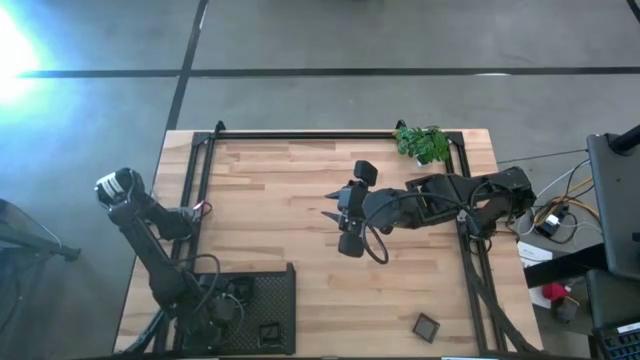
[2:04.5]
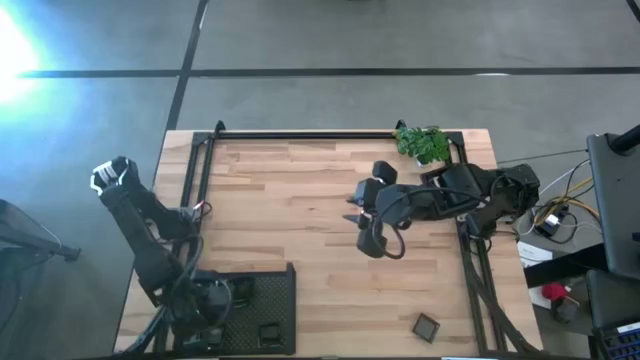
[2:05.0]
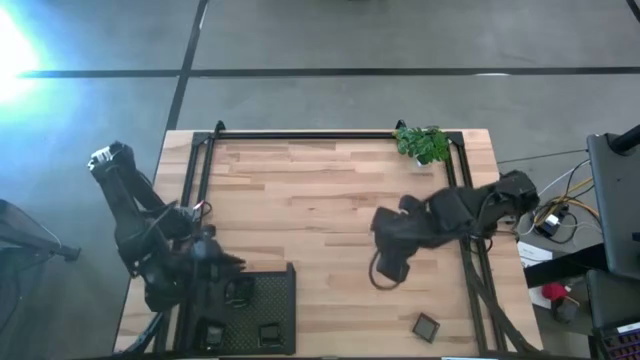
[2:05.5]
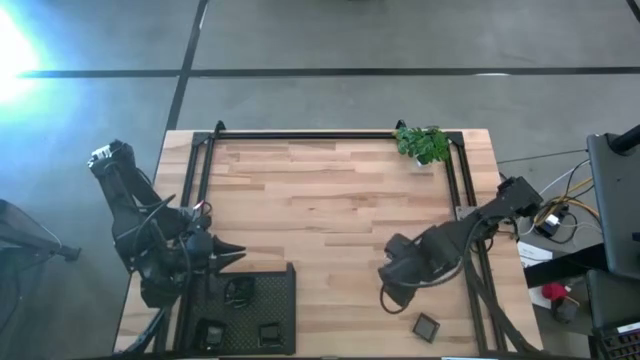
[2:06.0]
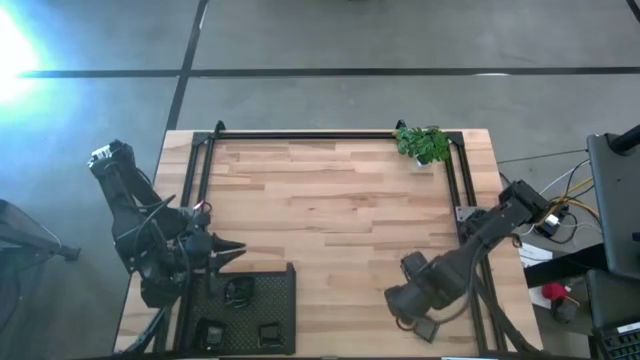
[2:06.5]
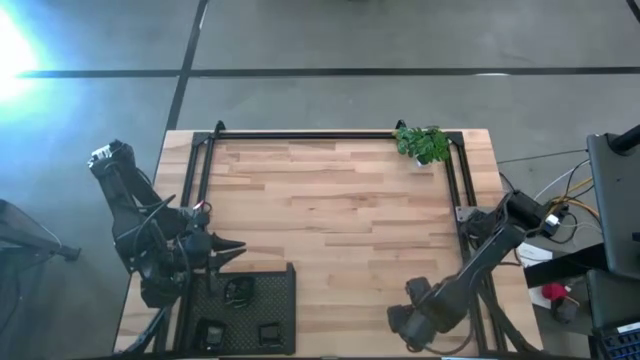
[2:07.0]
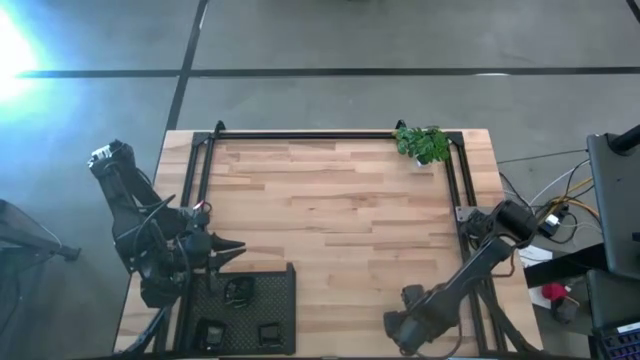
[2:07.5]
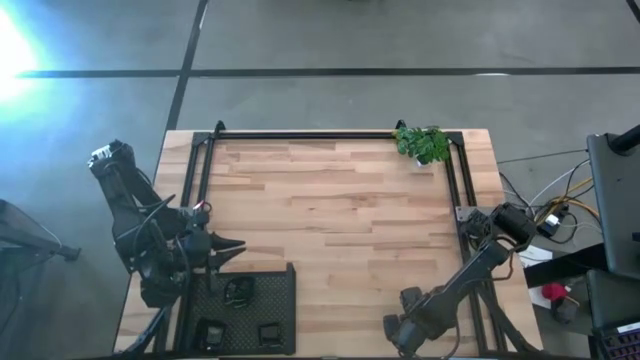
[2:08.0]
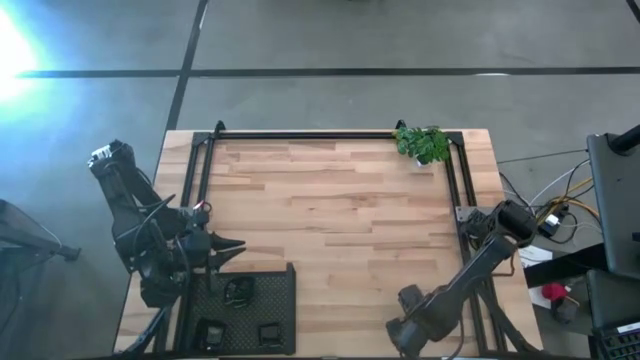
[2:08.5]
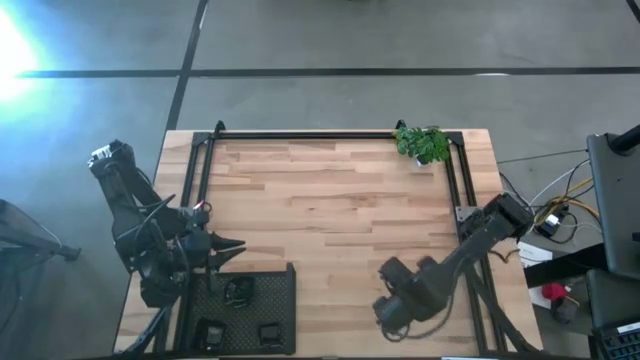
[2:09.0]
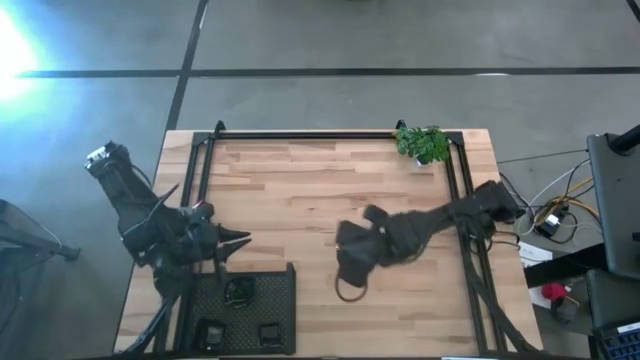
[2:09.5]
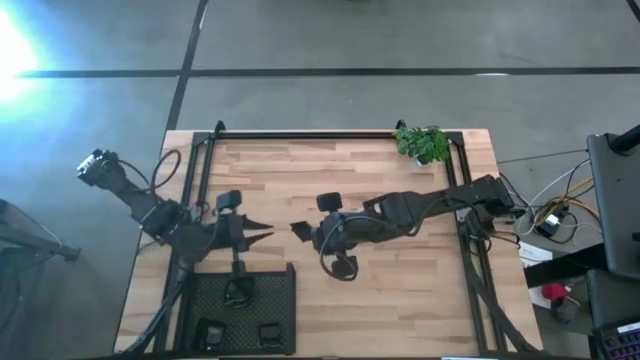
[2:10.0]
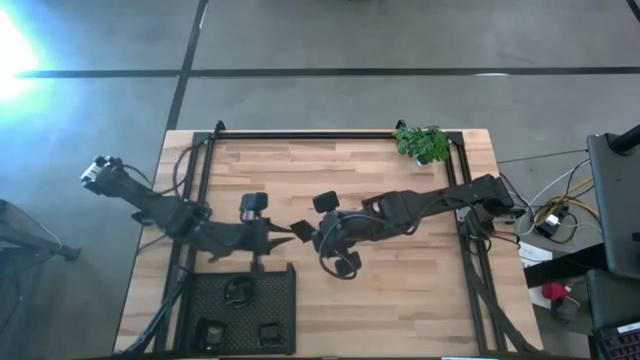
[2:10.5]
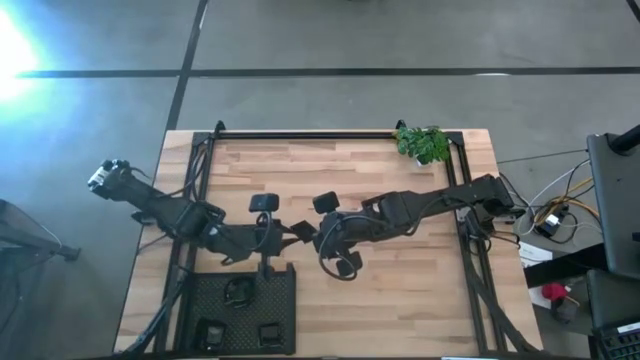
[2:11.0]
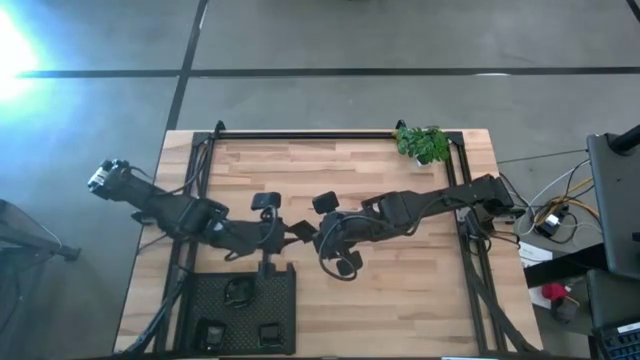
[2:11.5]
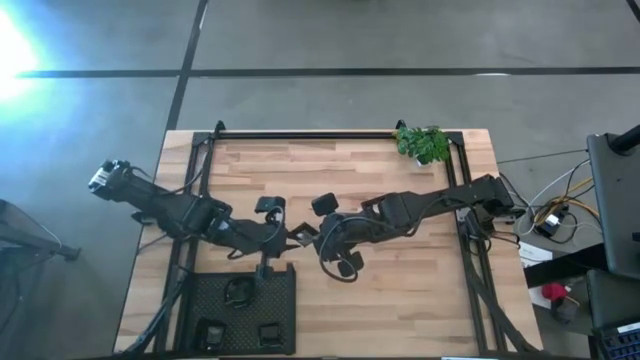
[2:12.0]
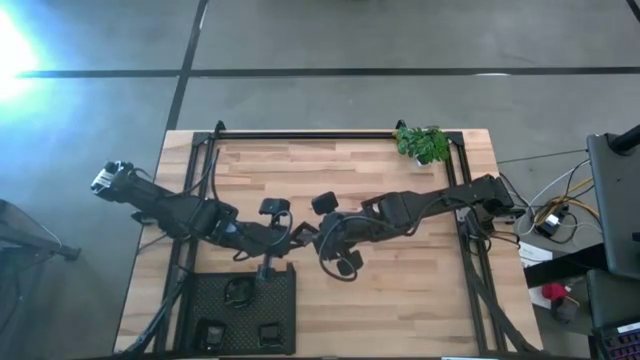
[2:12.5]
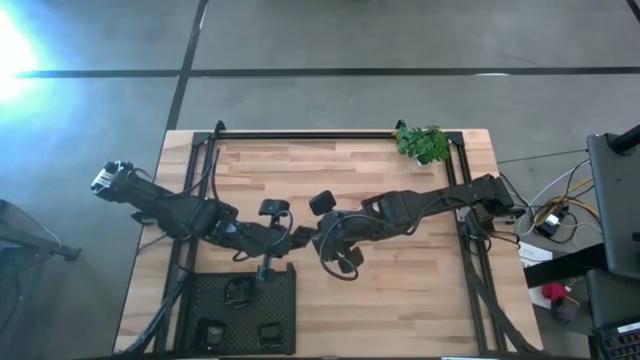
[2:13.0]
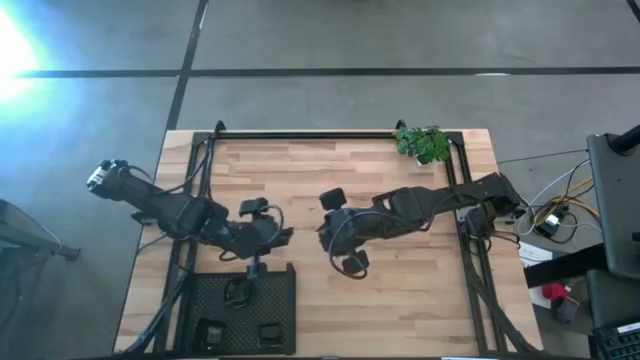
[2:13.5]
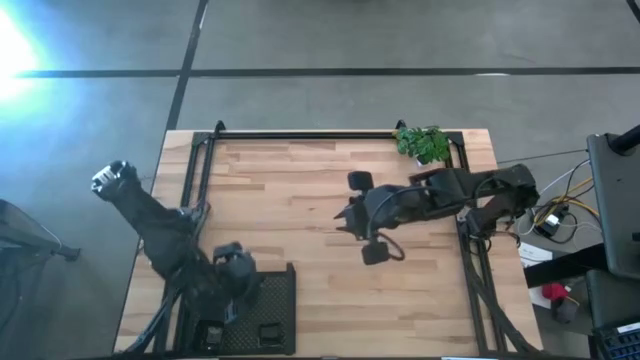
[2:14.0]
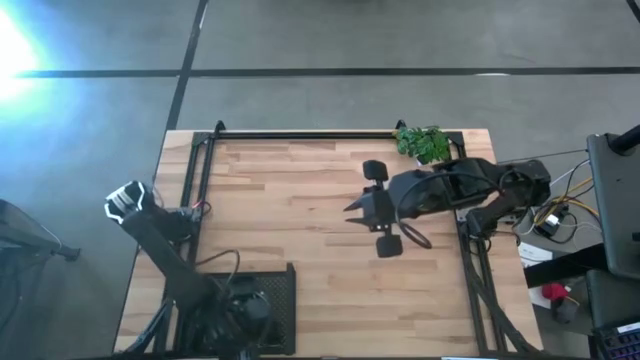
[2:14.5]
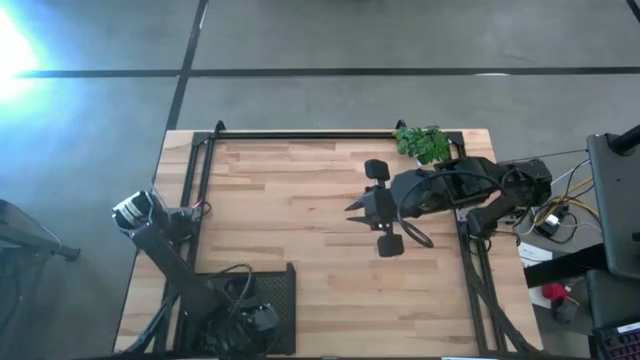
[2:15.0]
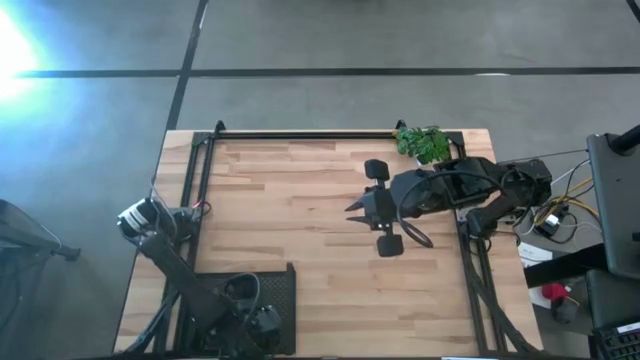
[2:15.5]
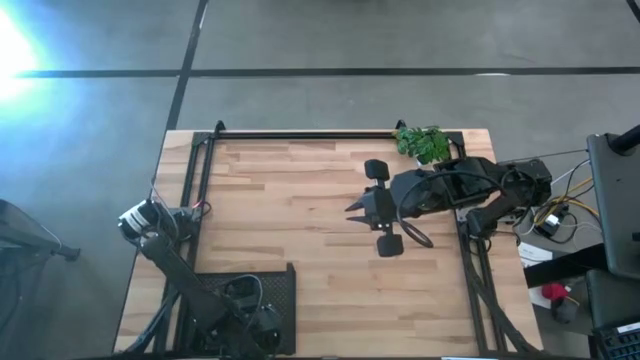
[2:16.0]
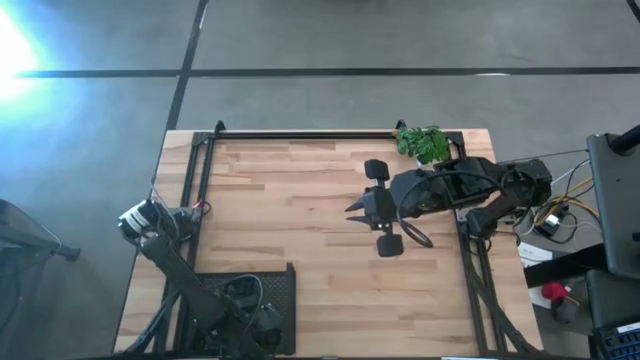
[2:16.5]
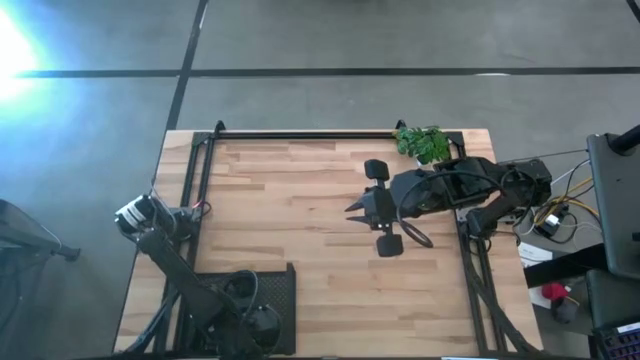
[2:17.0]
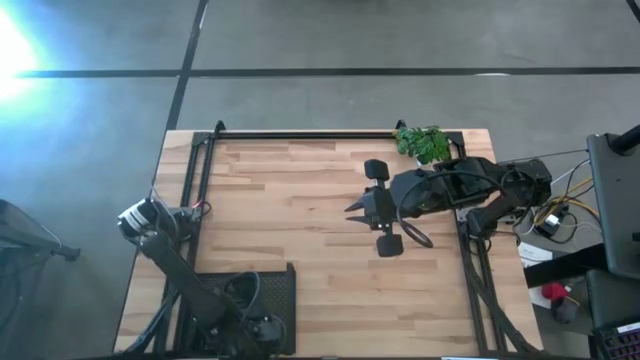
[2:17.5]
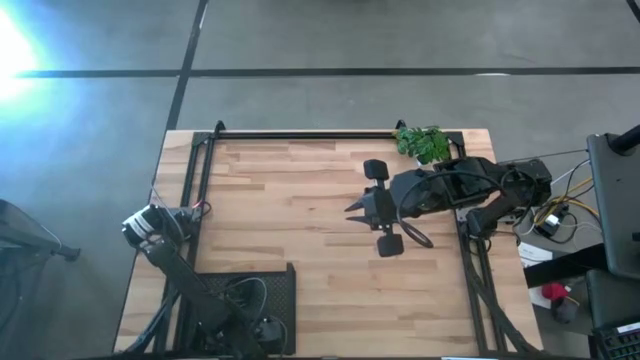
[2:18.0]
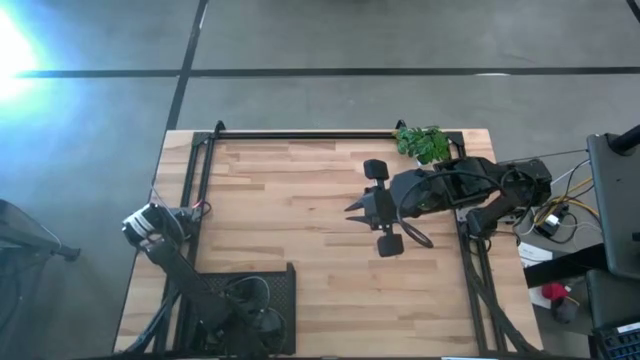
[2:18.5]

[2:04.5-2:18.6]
Task: Pick & Place Mini shaped plates
Stack the black square plate on the black square plate on the shelf

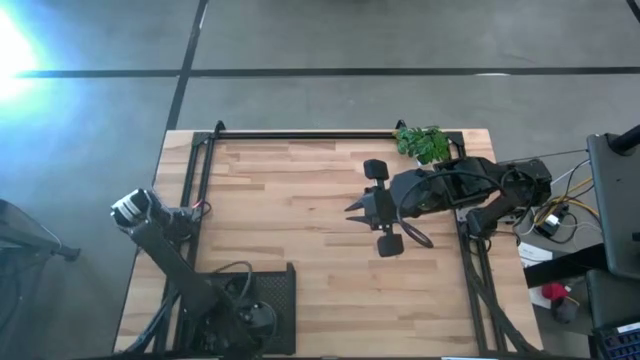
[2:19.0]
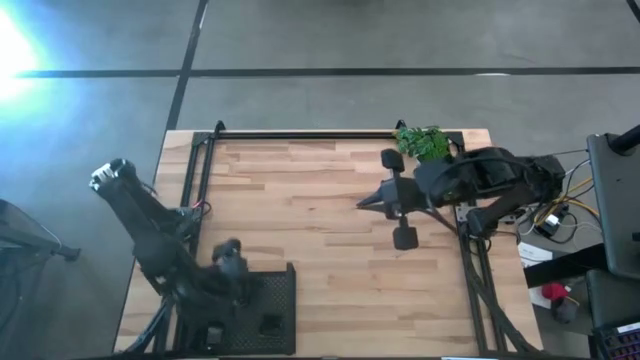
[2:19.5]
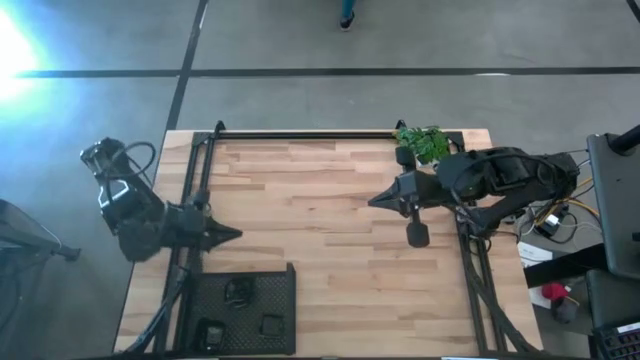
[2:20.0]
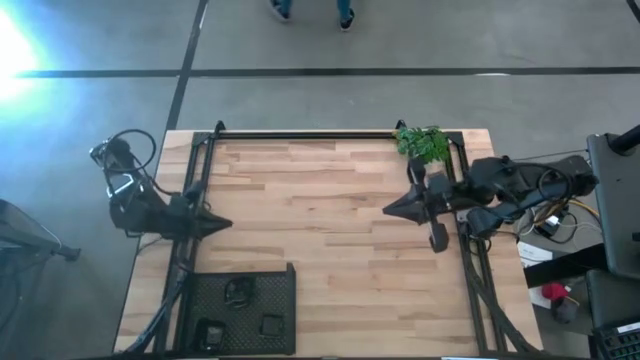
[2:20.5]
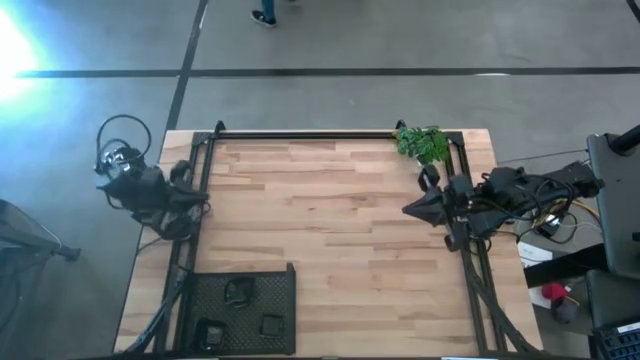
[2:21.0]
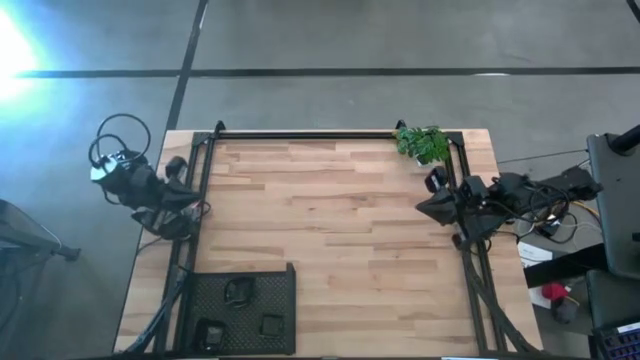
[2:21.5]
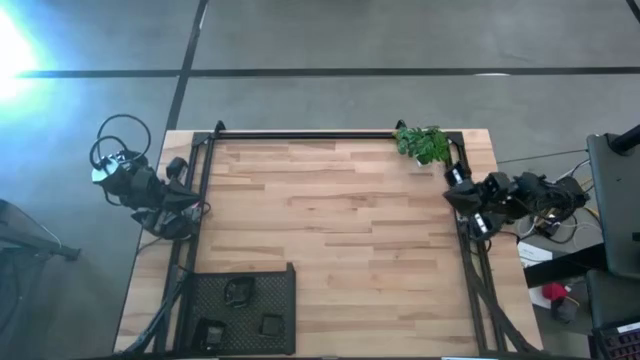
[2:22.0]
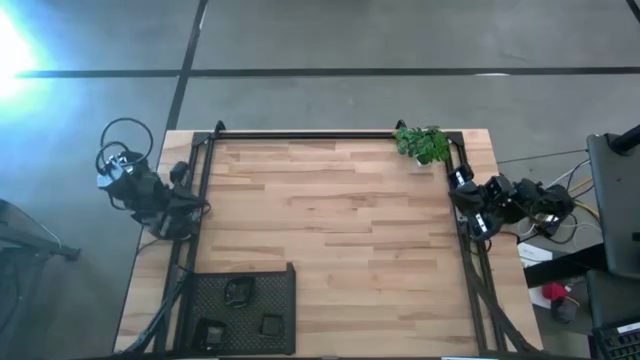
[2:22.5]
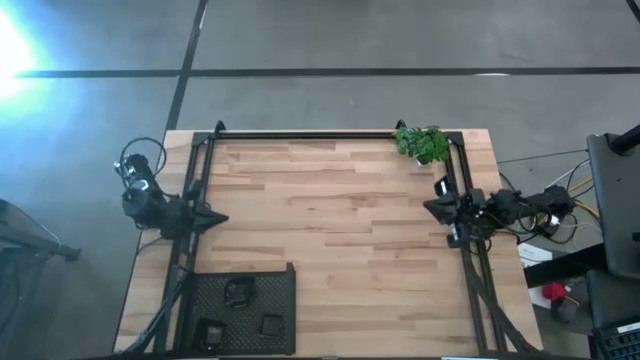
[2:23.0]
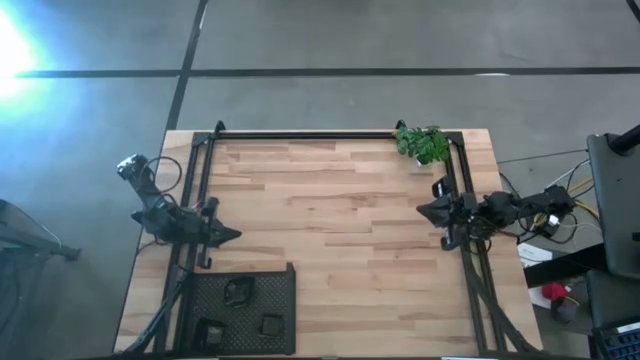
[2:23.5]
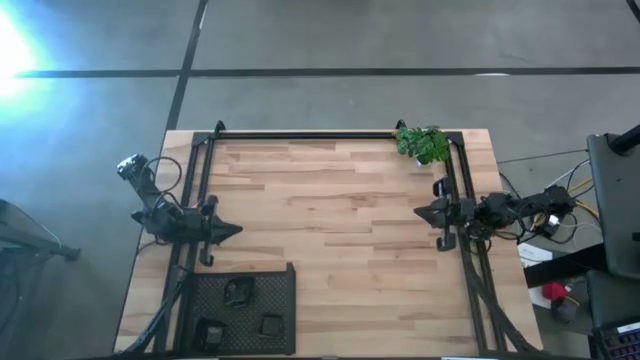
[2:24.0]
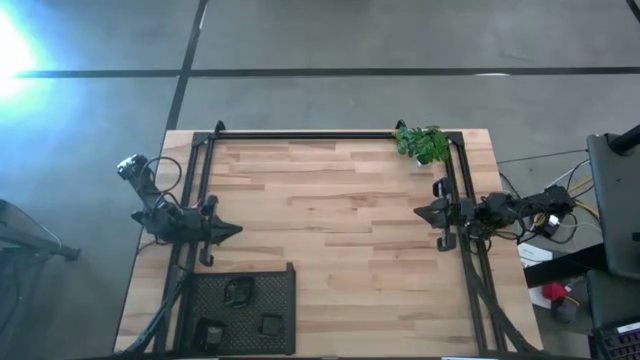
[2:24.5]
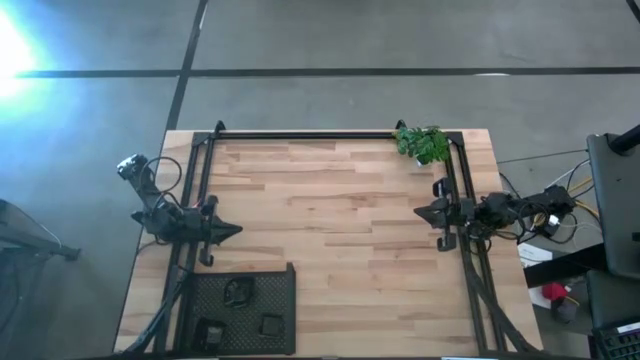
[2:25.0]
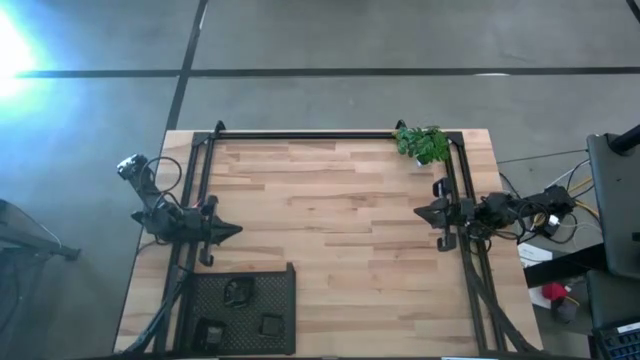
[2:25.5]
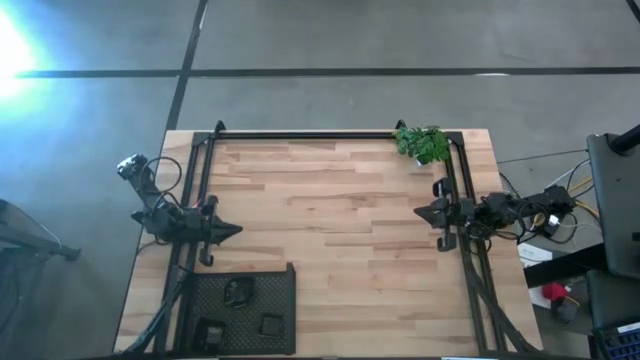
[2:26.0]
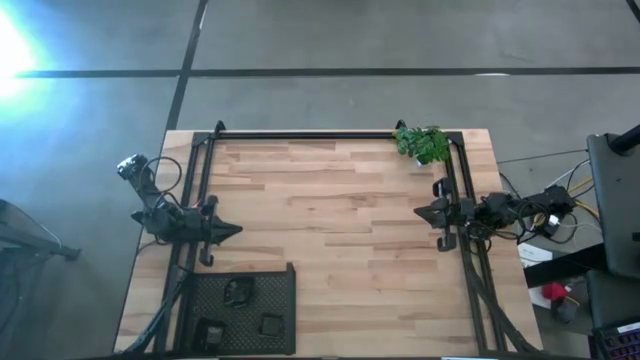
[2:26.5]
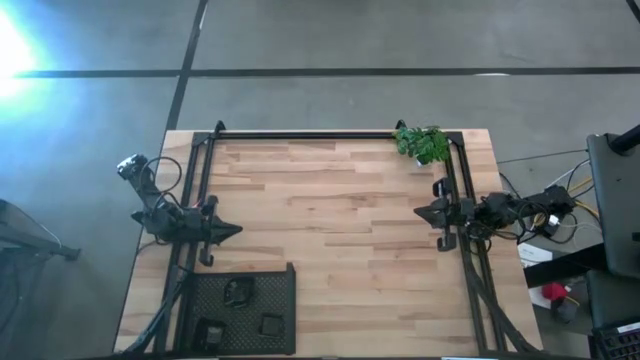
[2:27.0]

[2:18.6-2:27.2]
Return to Home Position
